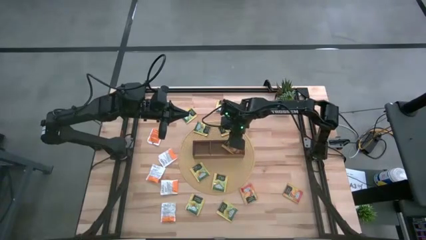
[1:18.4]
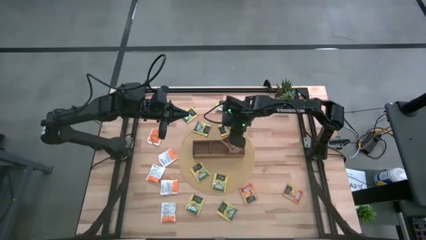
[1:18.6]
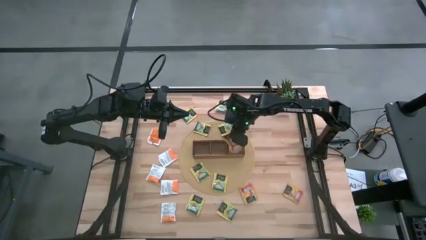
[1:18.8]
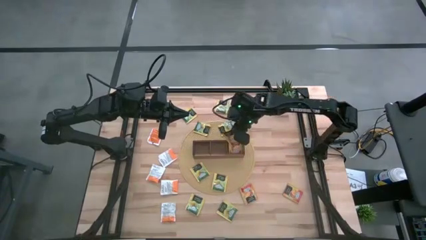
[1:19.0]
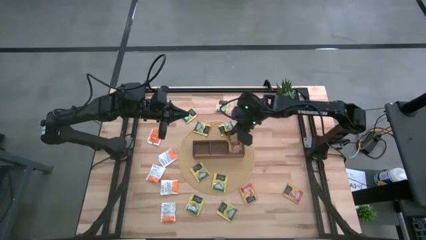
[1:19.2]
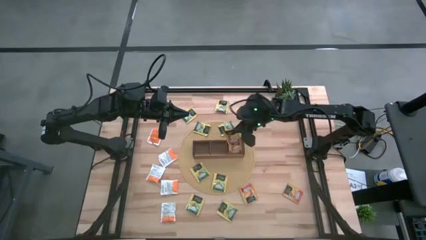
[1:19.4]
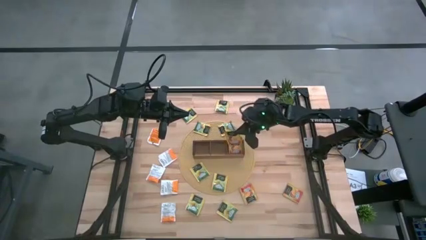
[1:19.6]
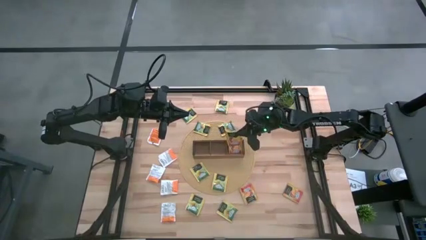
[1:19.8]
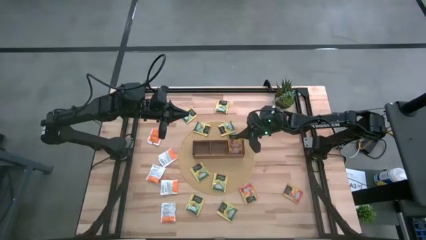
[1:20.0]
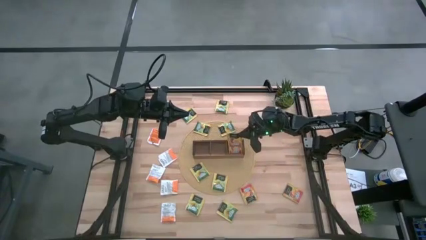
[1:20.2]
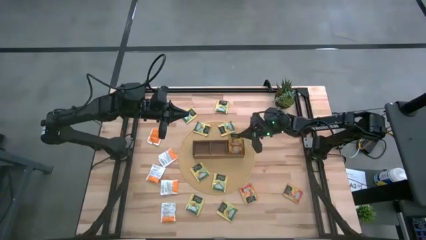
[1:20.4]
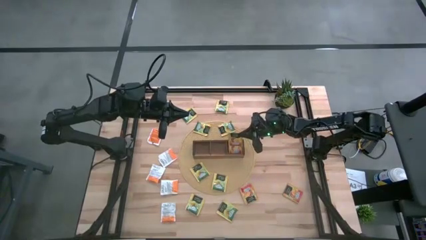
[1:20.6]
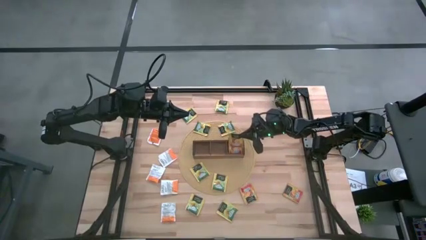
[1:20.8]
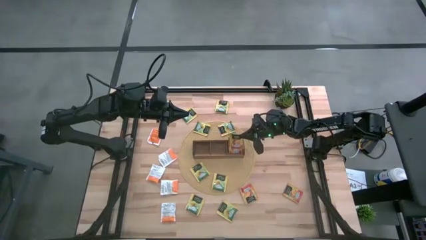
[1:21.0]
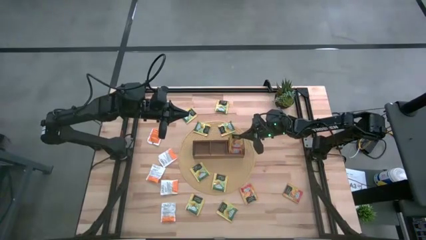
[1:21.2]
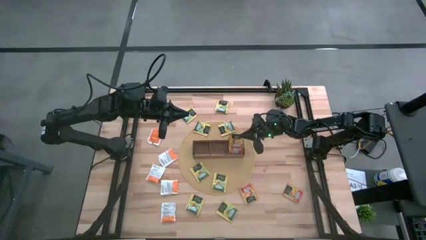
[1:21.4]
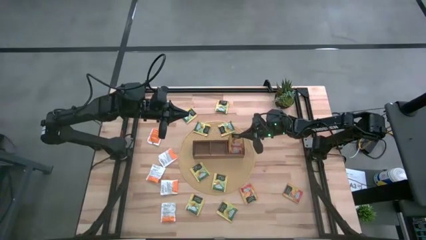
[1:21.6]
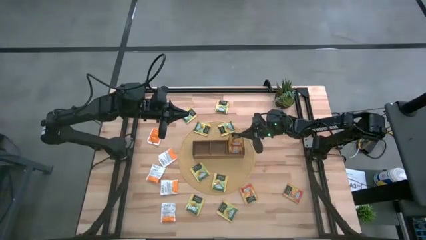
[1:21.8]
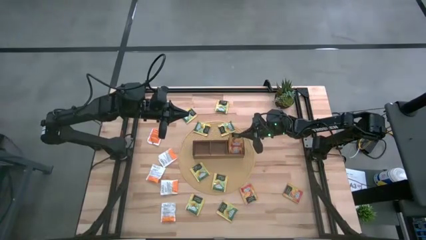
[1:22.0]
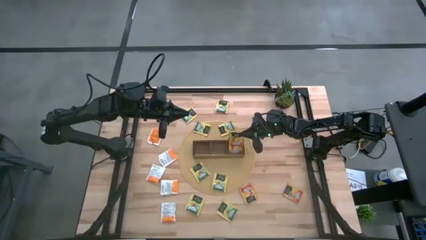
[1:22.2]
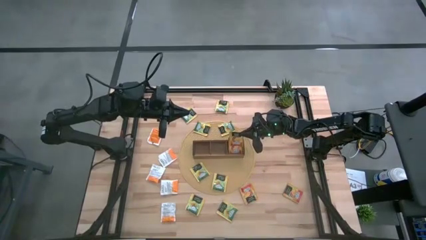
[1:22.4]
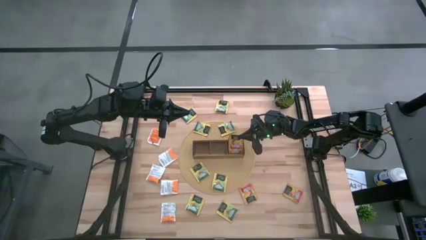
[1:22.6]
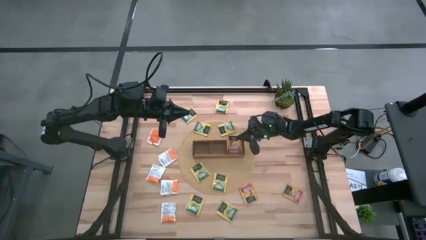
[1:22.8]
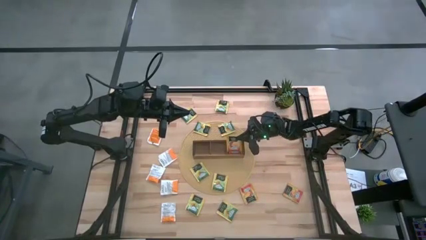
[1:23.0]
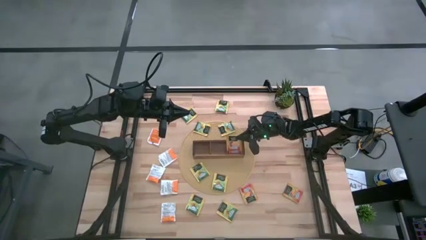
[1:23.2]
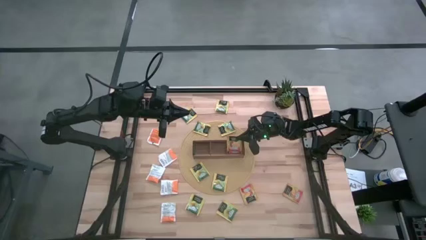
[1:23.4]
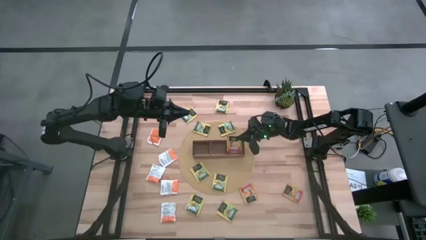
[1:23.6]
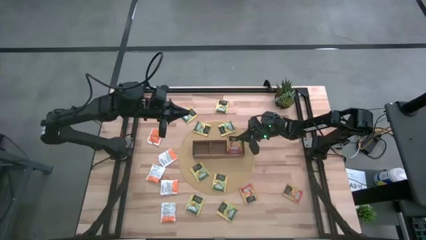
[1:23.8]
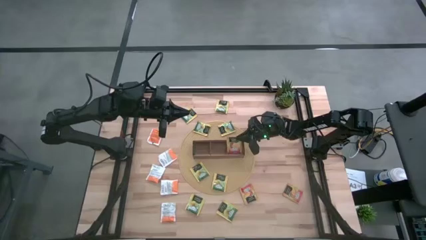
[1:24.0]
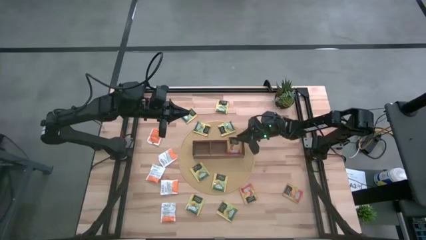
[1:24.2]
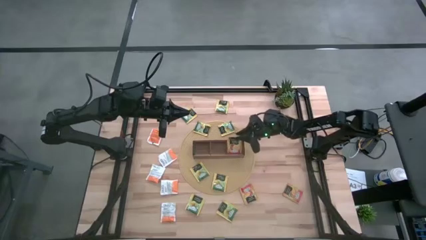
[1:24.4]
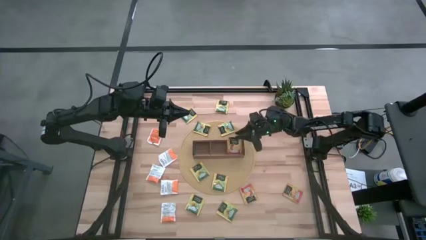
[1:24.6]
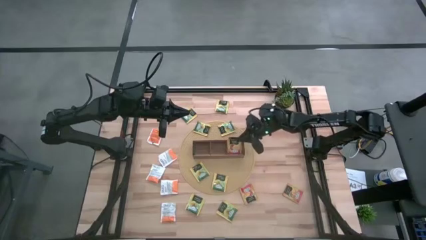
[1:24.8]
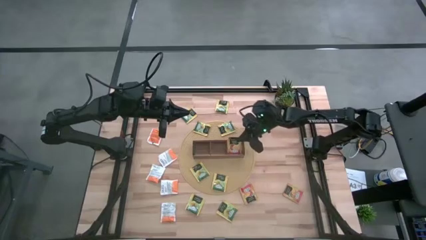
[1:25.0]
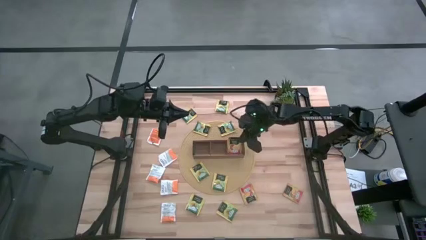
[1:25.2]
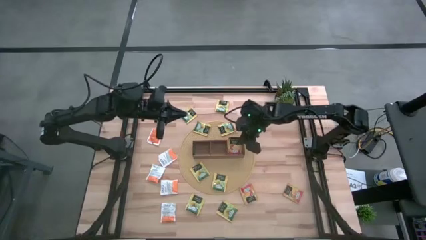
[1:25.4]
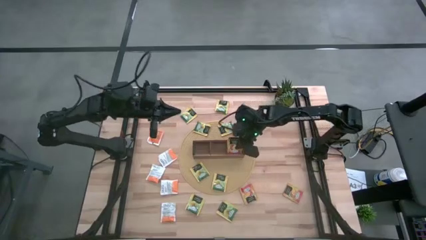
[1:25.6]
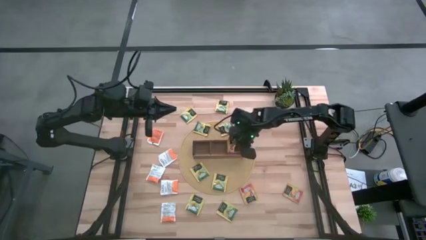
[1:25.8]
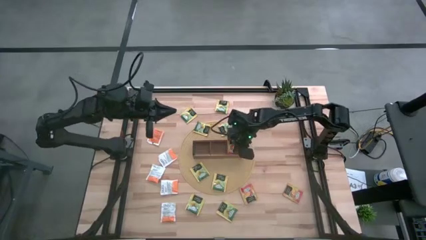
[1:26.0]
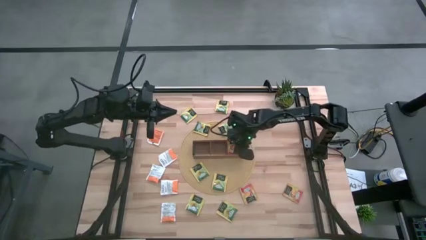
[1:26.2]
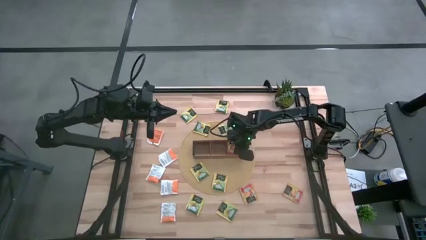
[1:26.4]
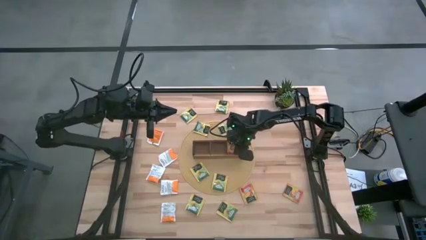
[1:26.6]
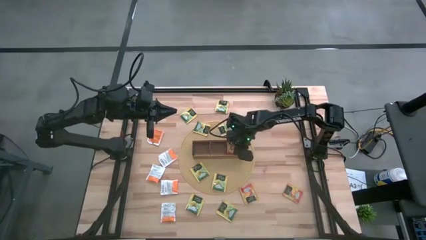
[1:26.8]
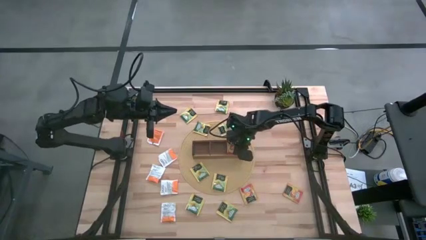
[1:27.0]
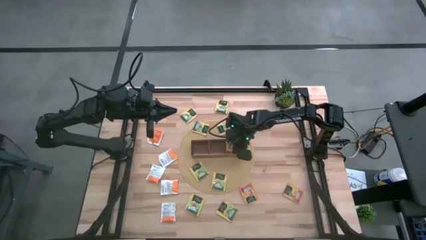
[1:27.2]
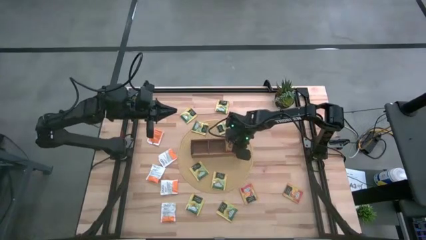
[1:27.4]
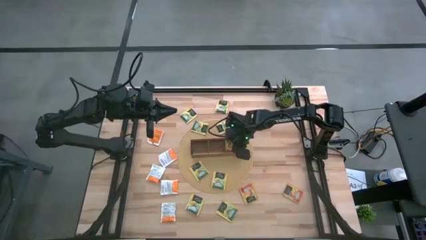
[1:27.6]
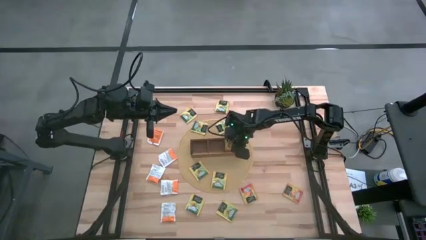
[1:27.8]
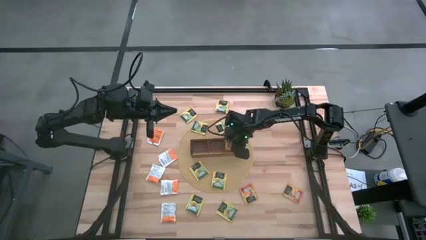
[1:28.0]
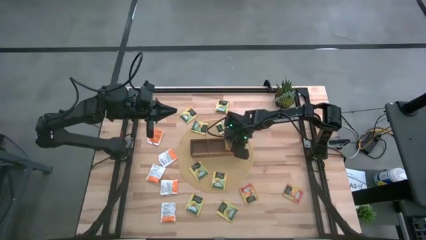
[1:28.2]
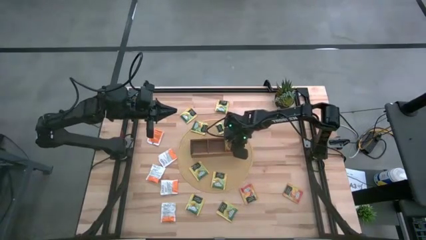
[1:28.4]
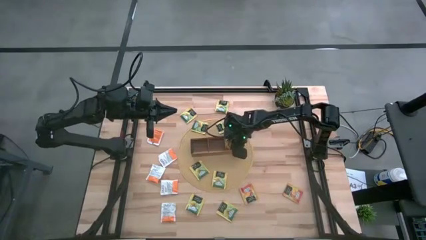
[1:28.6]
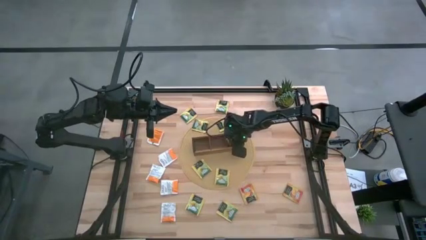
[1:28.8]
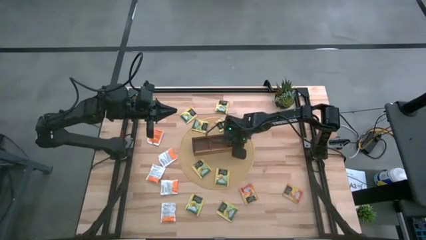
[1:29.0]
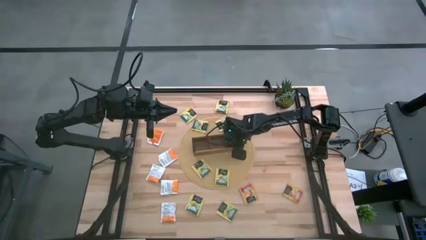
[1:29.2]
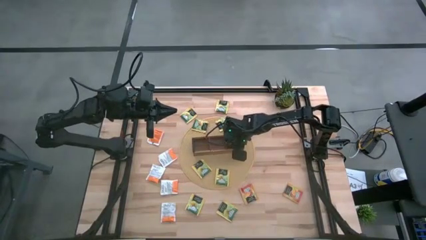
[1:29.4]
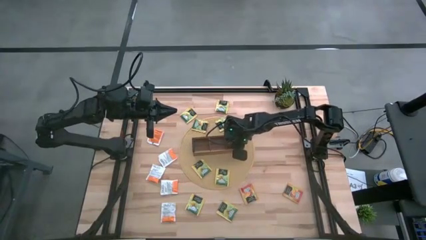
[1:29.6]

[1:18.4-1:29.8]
Task: Pick & Place Tea
Put the orange tea bag into the right section of the wooden organizer

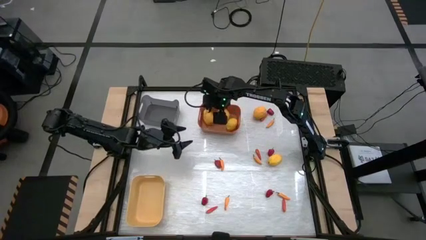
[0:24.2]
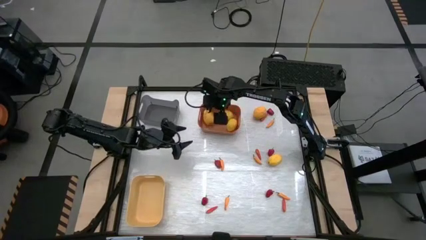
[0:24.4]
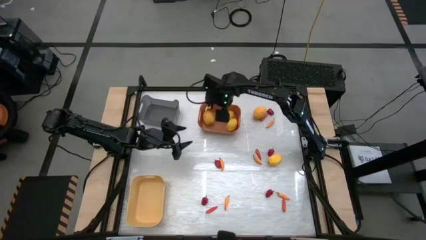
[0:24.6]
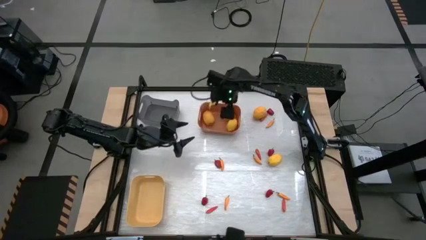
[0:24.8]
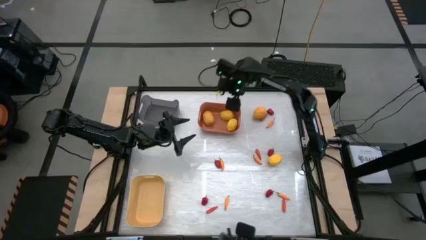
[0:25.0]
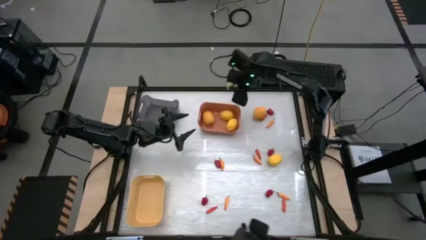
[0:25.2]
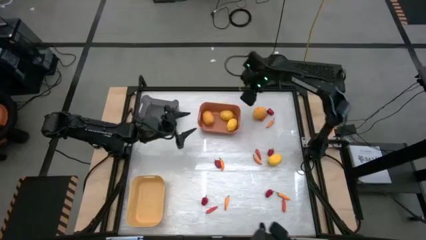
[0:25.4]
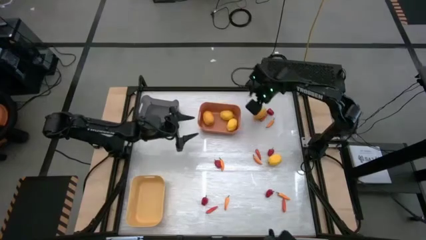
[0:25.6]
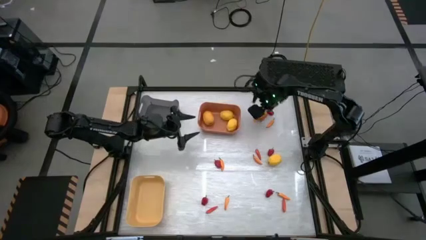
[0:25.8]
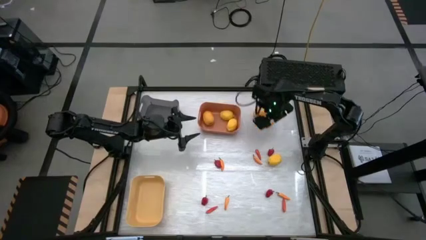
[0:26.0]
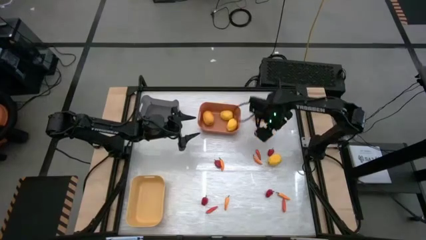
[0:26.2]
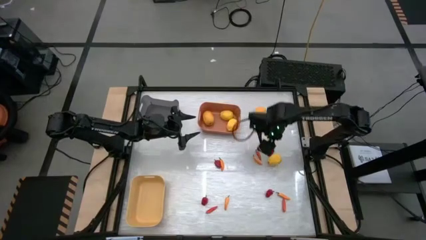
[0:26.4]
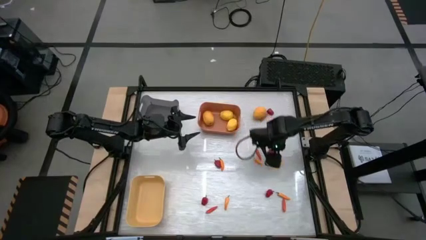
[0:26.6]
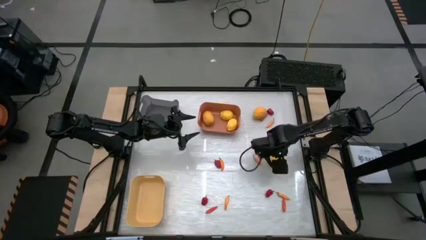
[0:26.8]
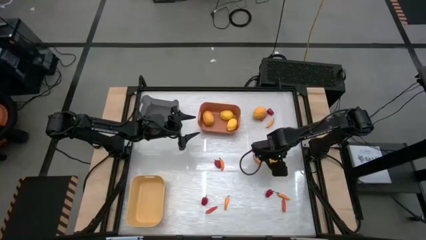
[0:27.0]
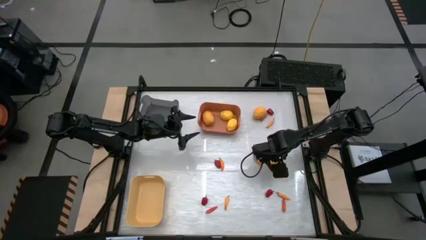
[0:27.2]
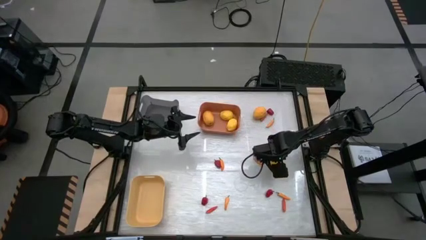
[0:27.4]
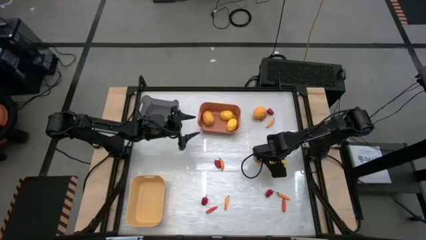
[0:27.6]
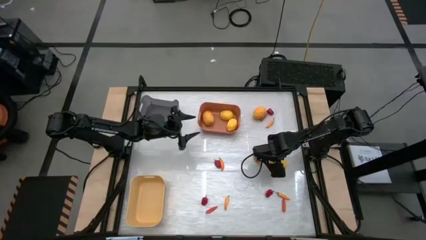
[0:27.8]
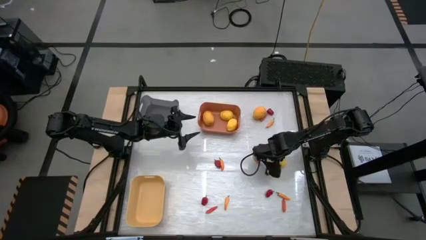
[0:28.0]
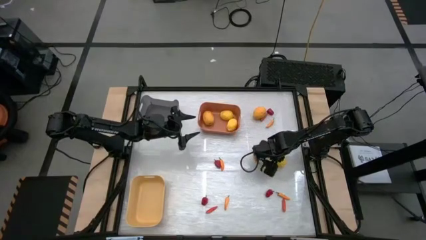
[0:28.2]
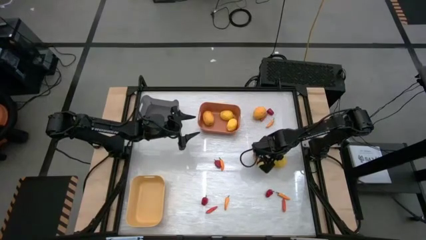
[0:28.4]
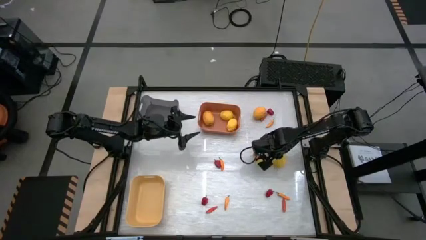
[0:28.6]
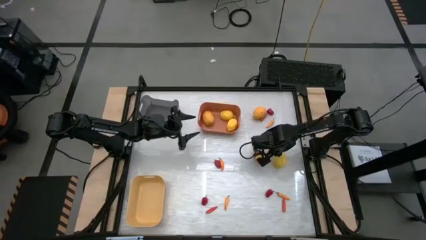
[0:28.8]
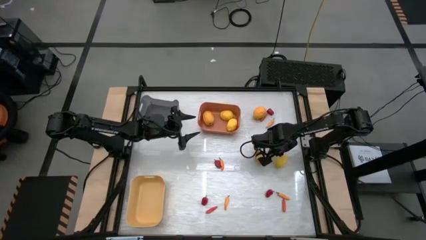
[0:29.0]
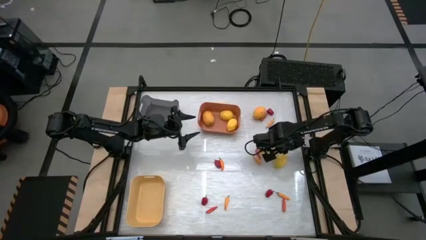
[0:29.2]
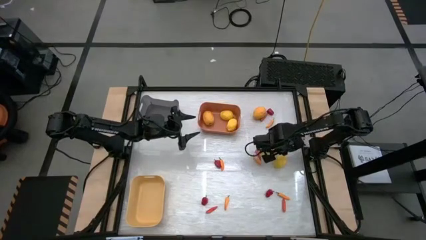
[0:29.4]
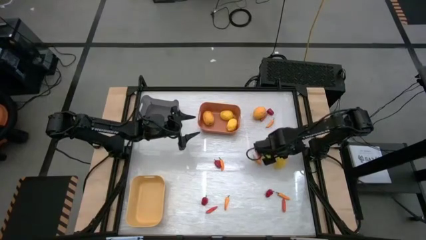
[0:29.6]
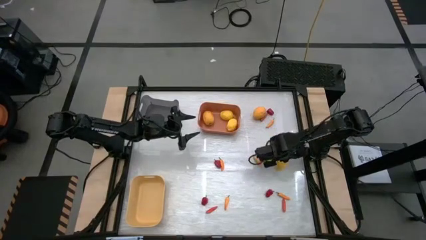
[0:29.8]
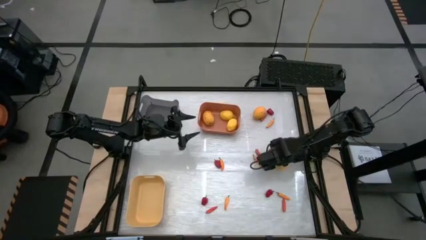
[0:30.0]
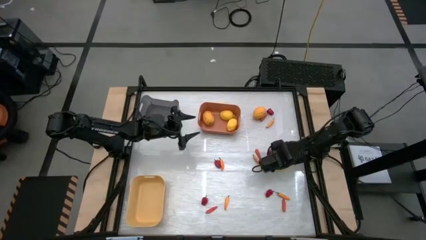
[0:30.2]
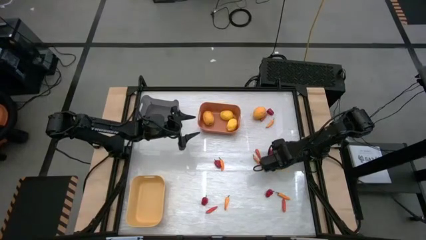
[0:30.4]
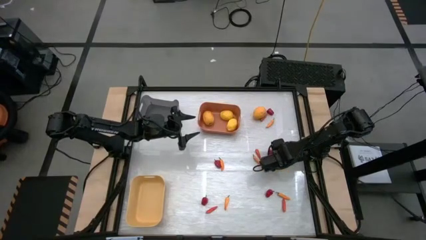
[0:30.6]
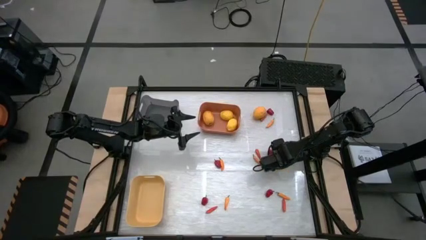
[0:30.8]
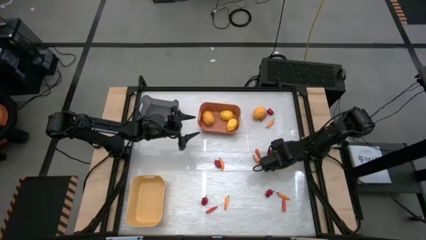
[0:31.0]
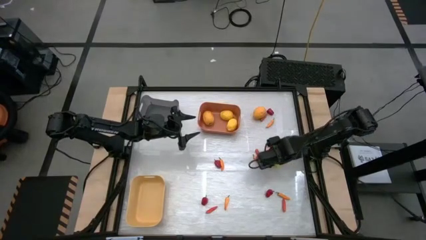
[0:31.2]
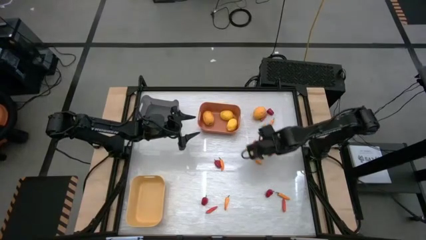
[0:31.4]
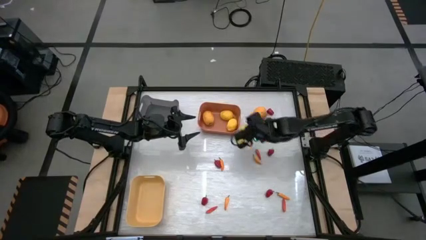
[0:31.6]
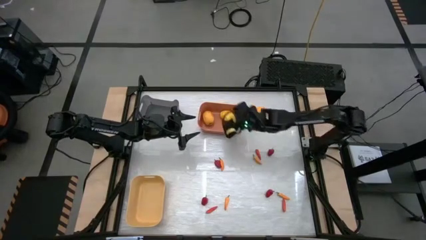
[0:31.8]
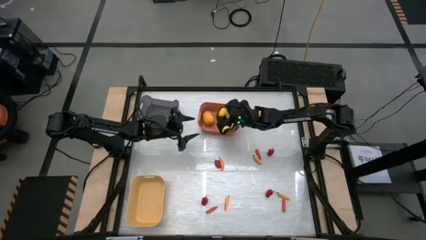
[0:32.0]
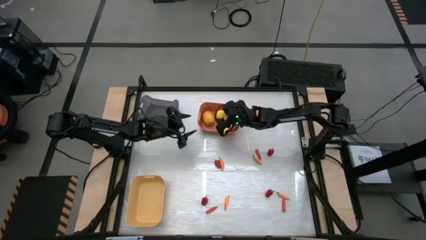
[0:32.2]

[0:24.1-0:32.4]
Task: Sort produce into baskets
Put the lemon into the orange bin
